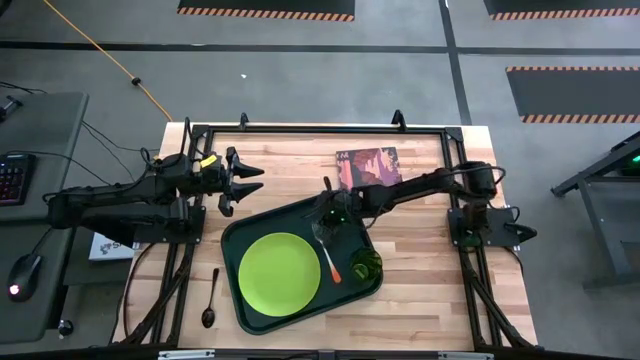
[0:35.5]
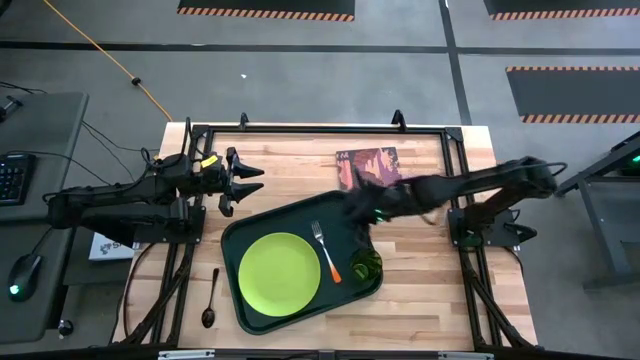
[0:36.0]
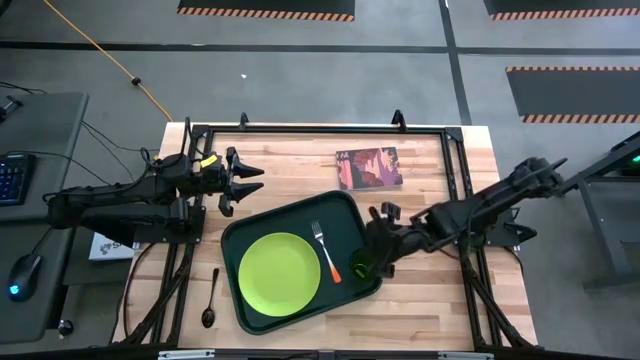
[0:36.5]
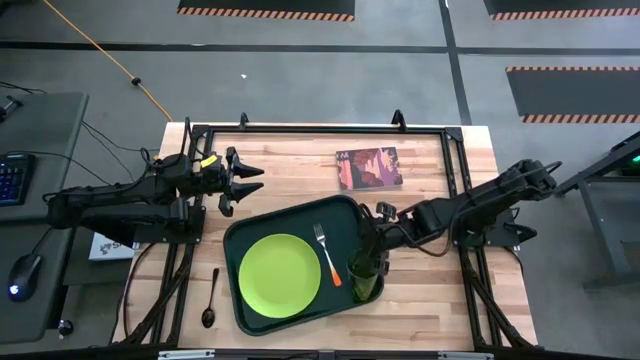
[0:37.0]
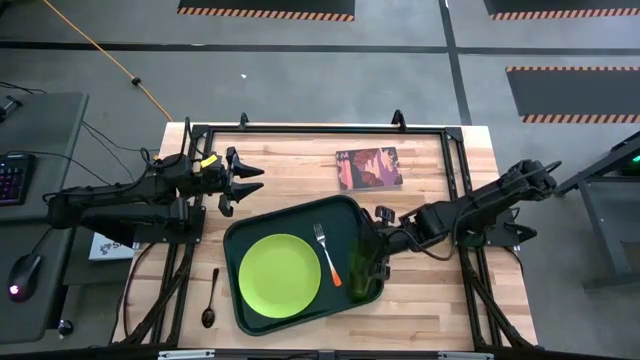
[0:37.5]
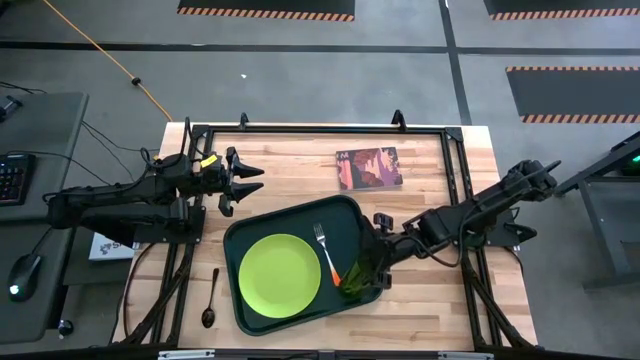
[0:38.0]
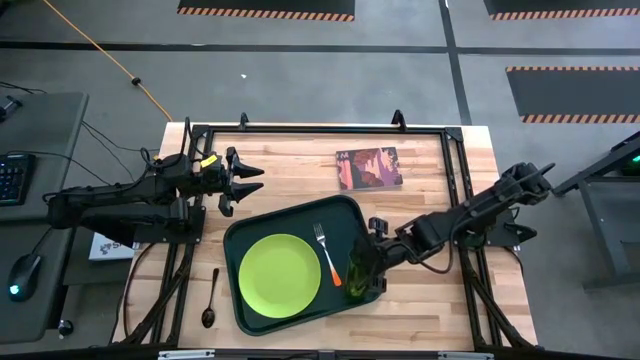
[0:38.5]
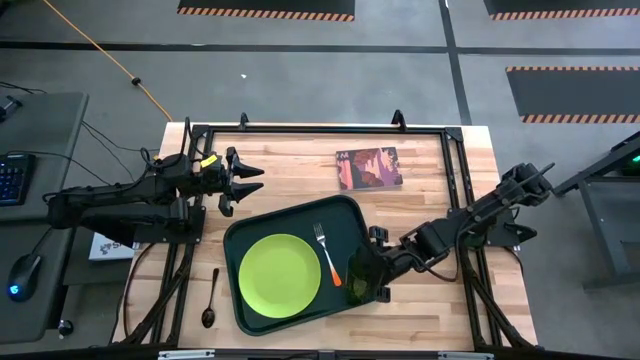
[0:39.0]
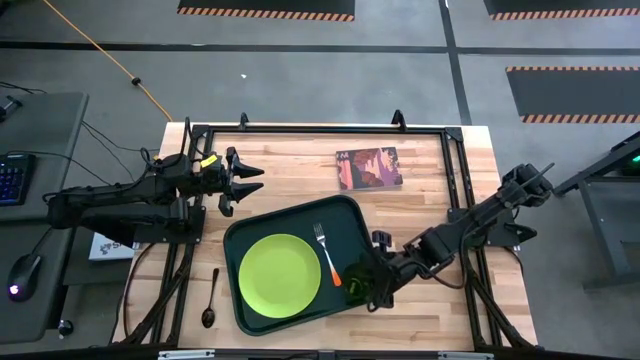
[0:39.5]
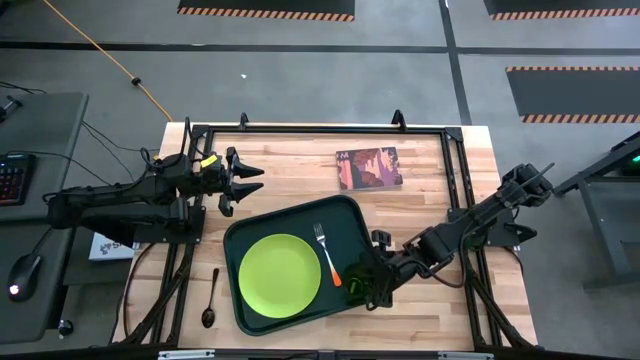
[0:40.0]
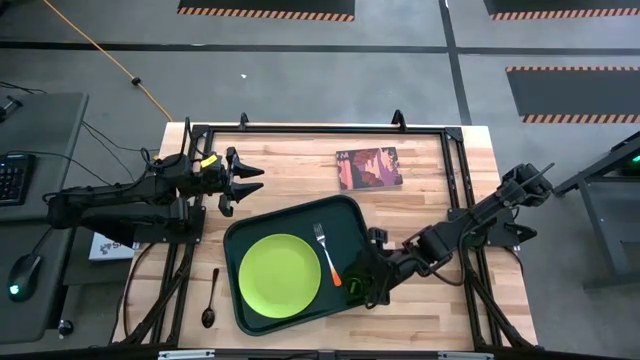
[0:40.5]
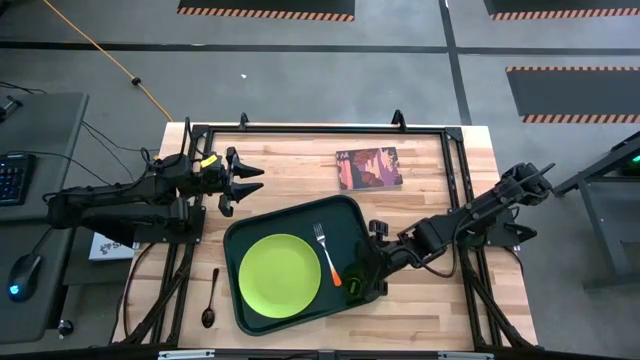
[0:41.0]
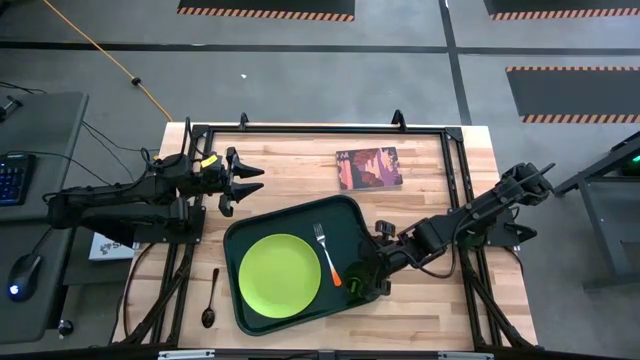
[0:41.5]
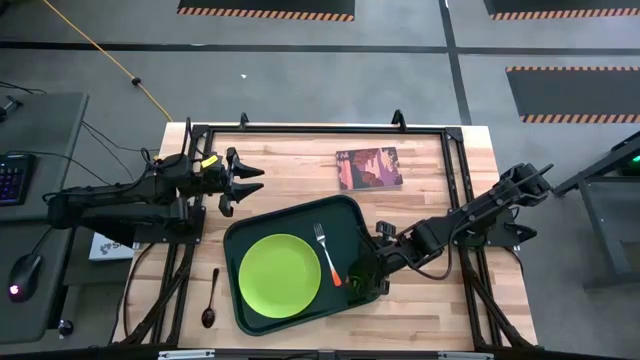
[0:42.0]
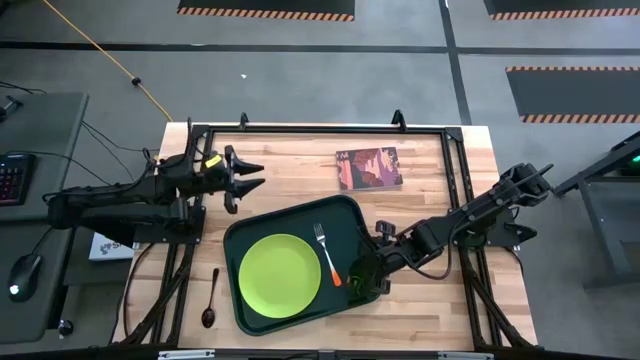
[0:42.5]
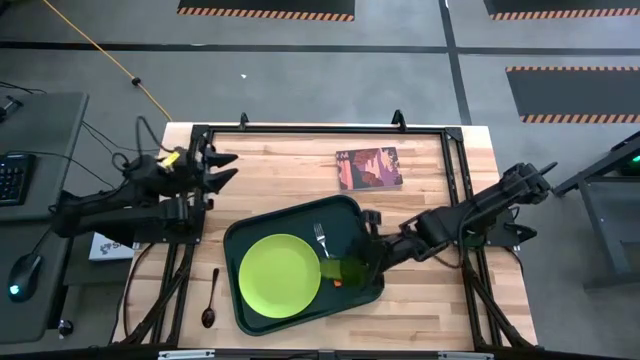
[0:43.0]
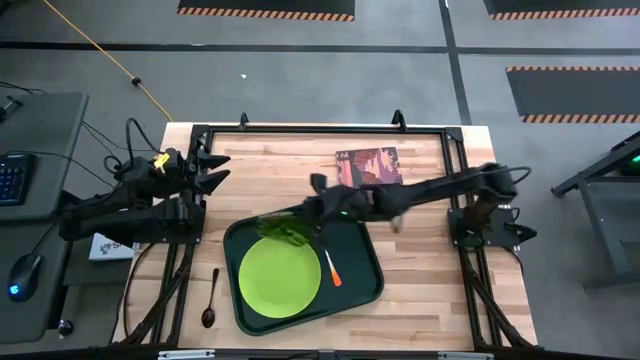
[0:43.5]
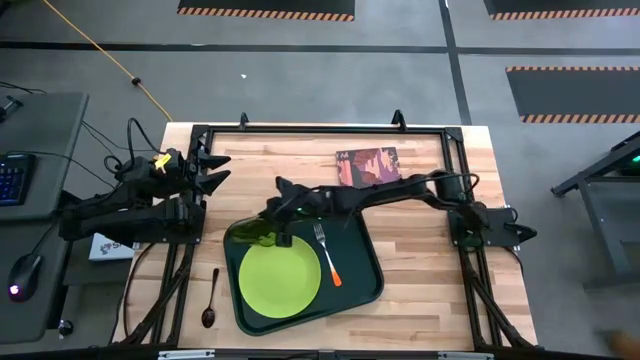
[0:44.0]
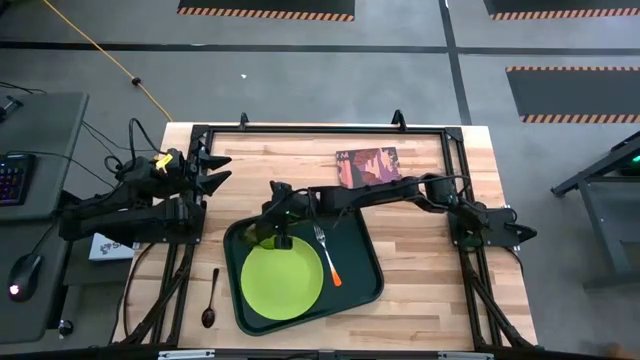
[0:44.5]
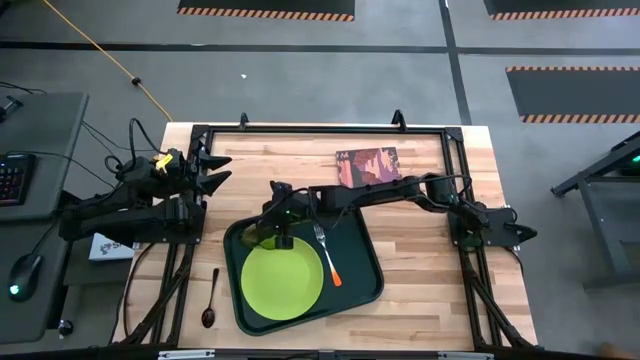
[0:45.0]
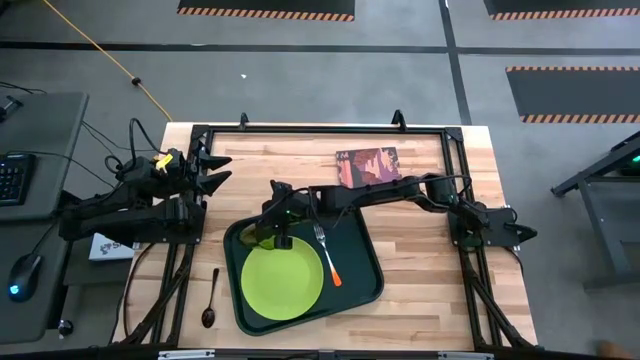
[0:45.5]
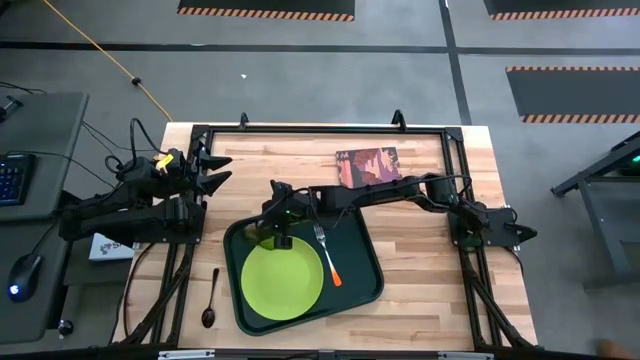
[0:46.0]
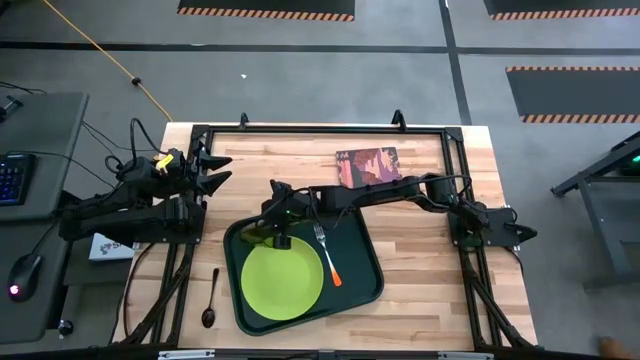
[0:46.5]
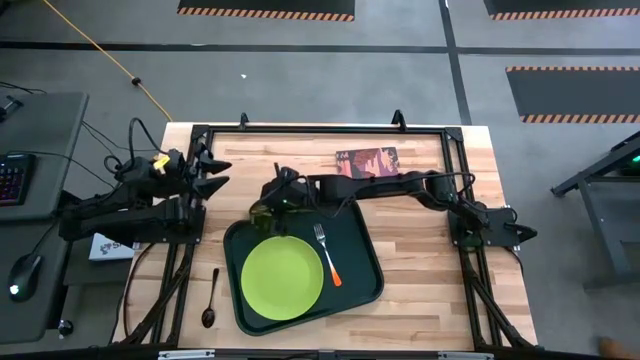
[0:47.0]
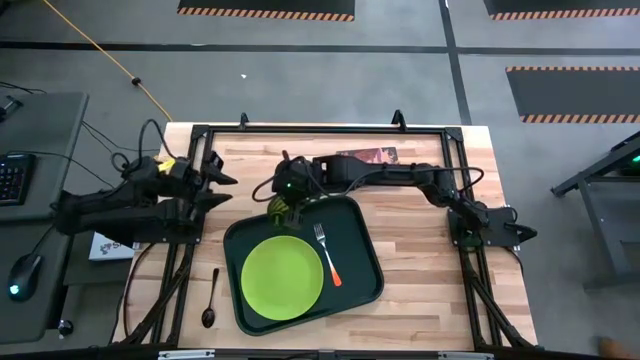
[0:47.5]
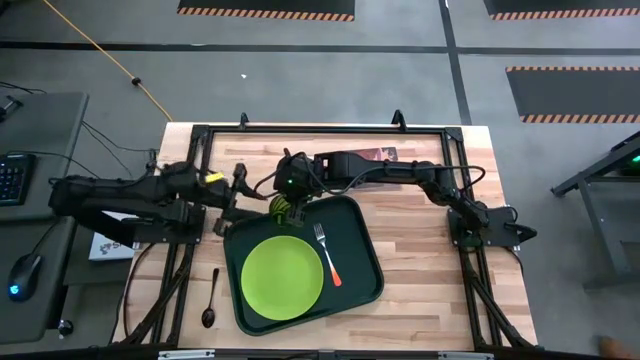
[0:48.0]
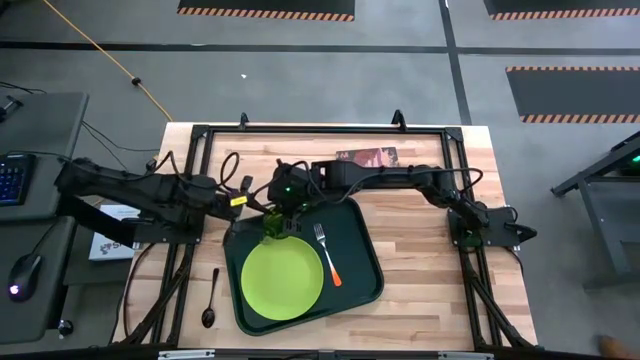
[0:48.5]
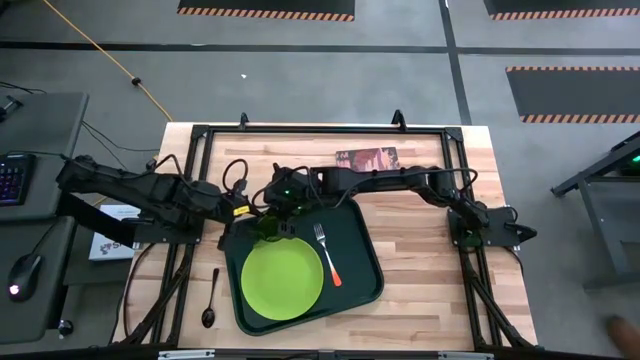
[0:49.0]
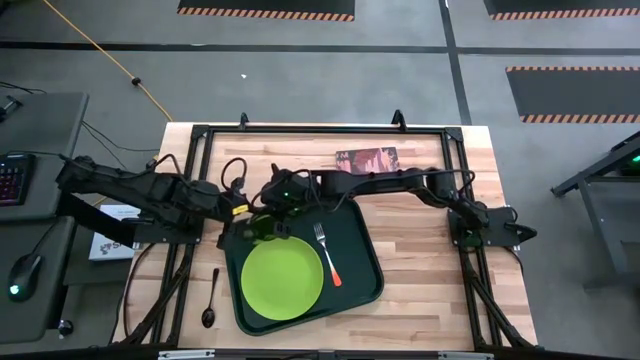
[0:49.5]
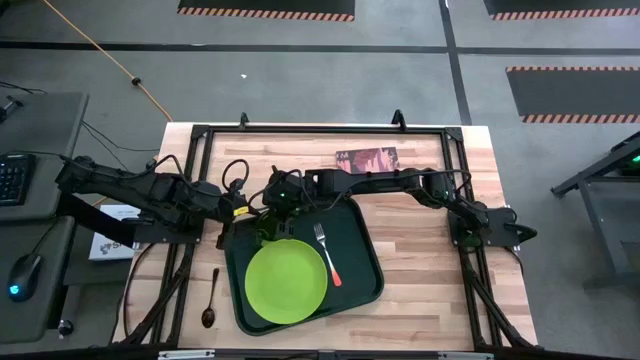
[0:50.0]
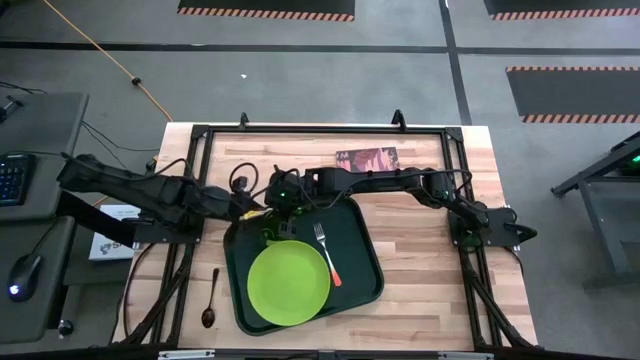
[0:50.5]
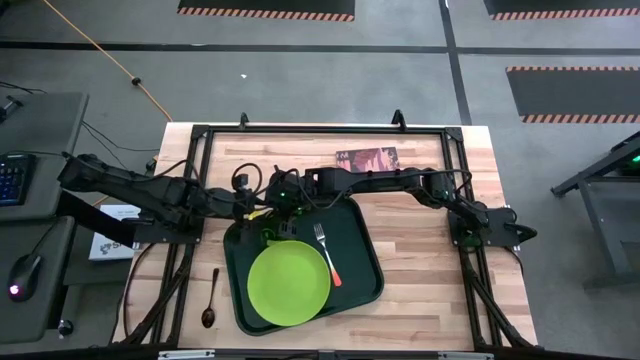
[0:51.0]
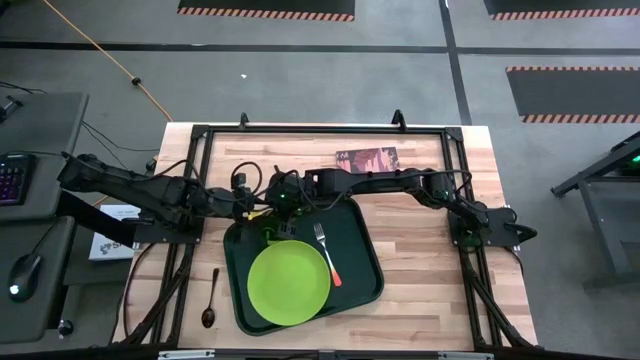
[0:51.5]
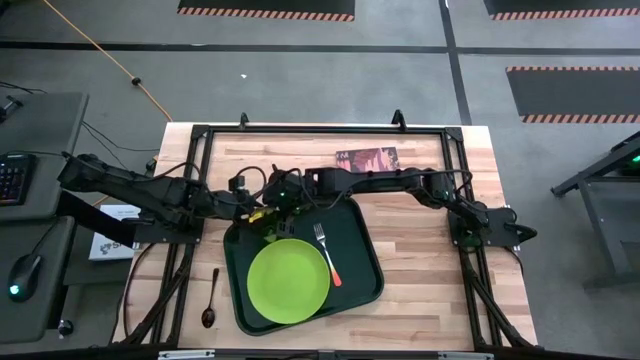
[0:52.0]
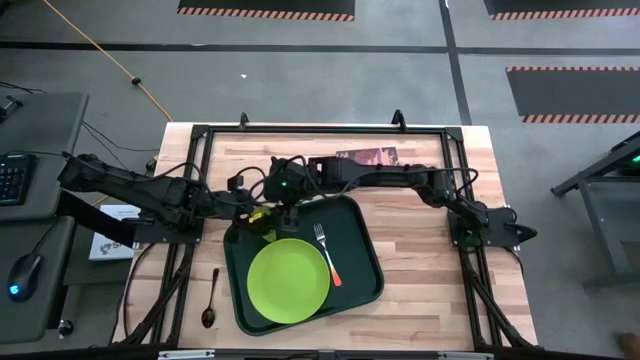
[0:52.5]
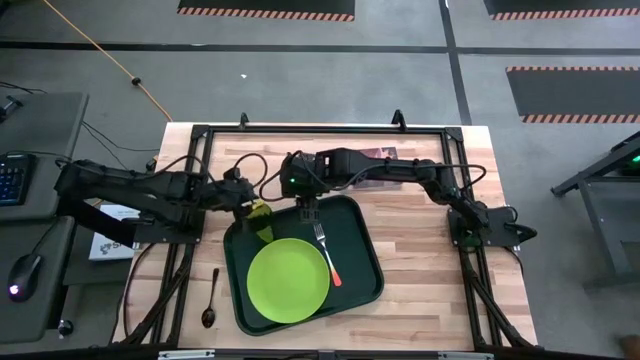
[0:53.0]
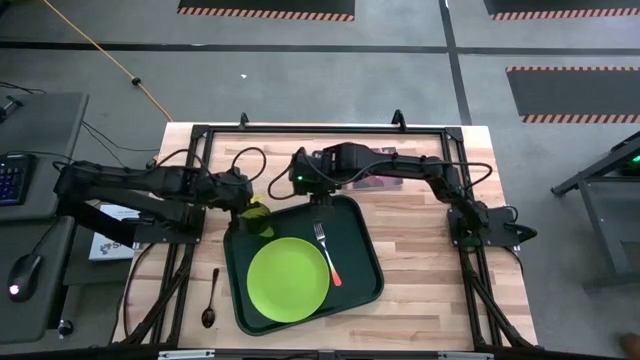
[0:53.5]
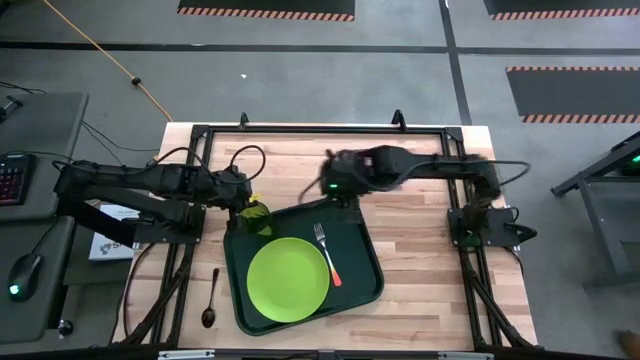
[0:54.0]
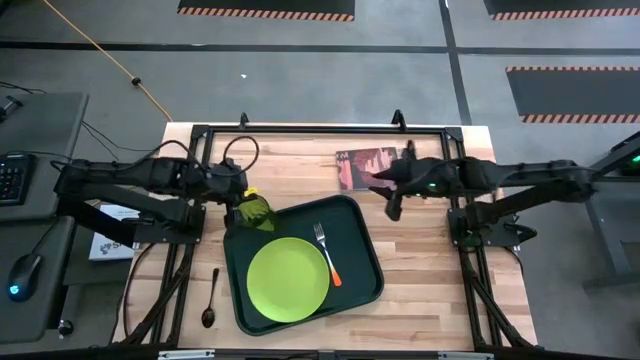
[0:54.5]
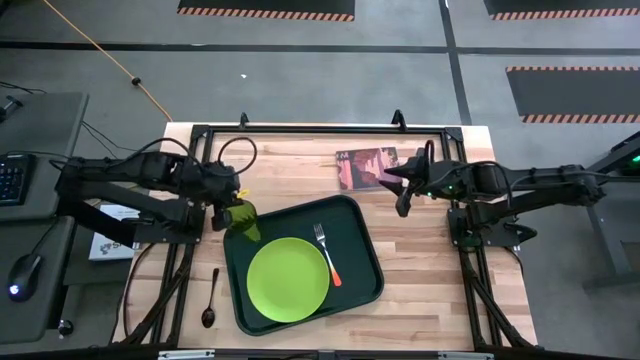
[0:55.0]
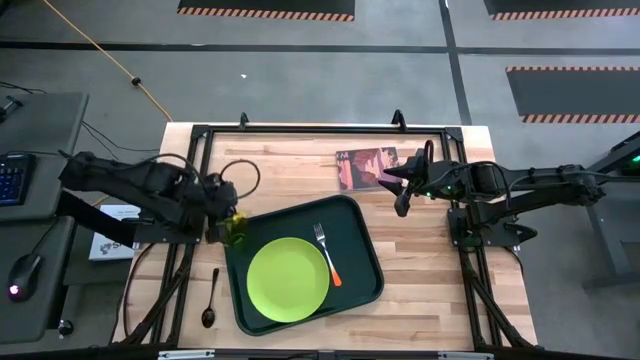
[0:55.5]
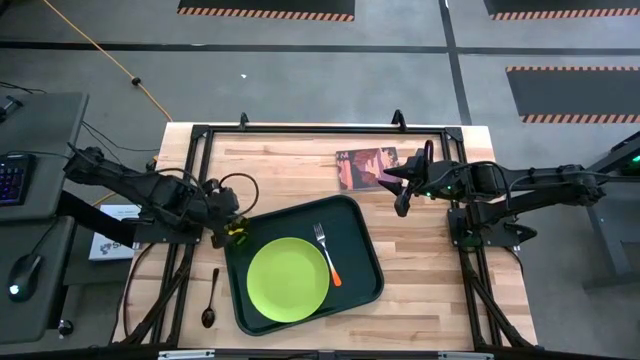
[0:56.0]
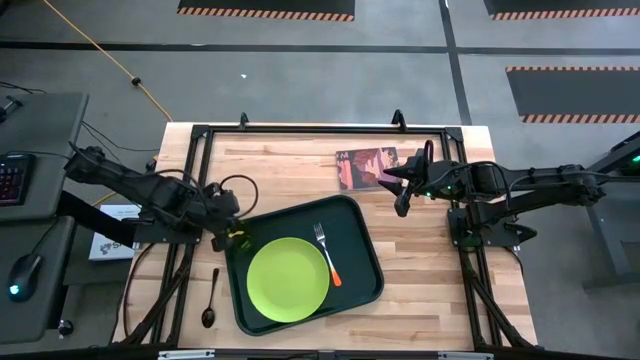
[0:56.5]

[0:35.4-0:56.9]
Task: Pick and place plate/cup/fork/spoon on tray
Move the green cup on the black tray to the top left of the green plate

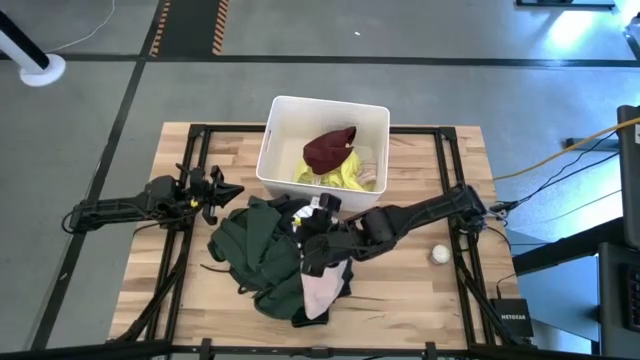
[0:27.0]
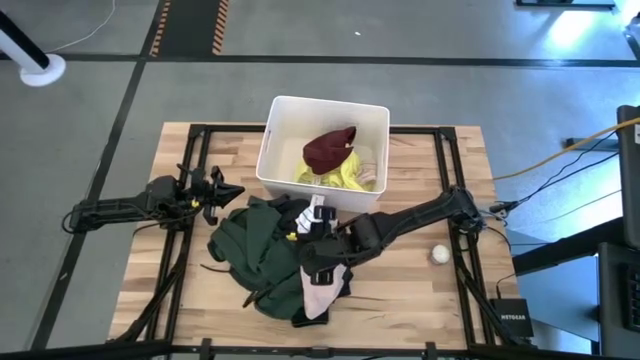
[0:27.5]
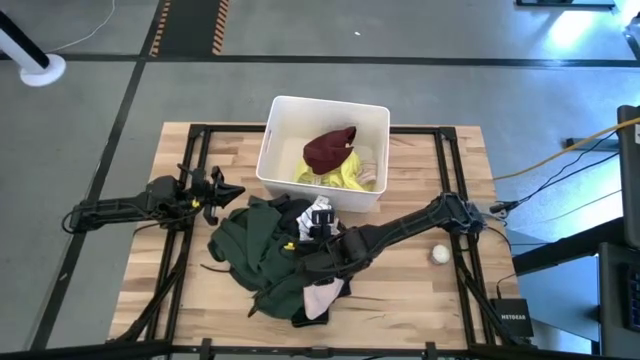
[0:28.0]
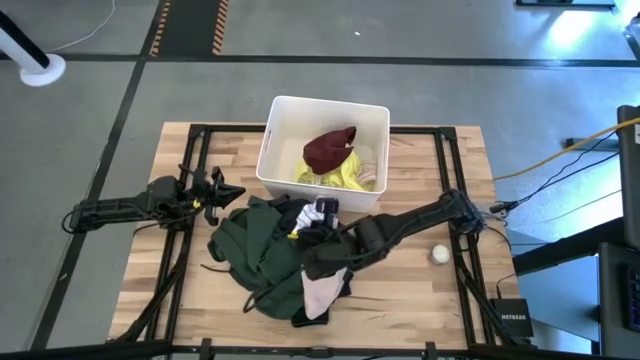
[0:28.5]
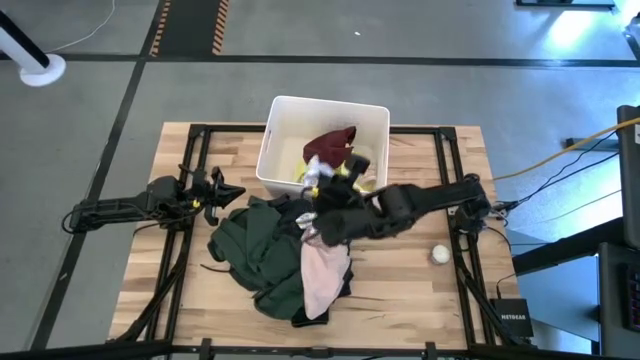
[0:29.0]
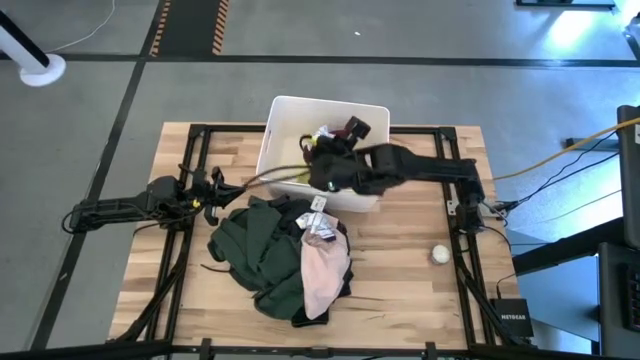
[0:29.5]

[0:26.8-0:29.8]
Task: Sort clothes
Put the top white stripe sock into the white bin
